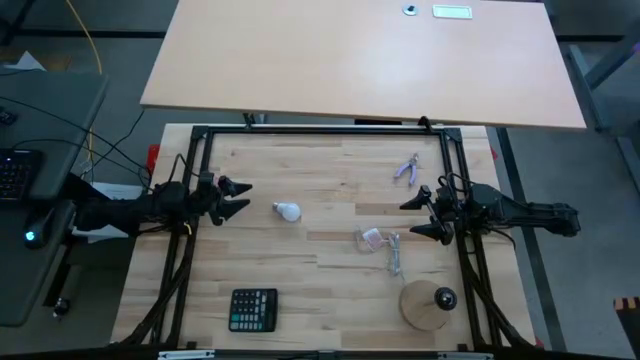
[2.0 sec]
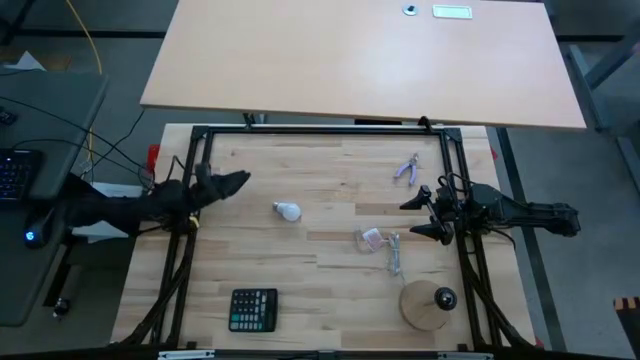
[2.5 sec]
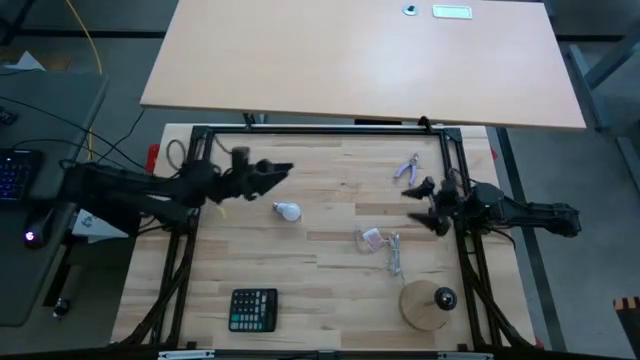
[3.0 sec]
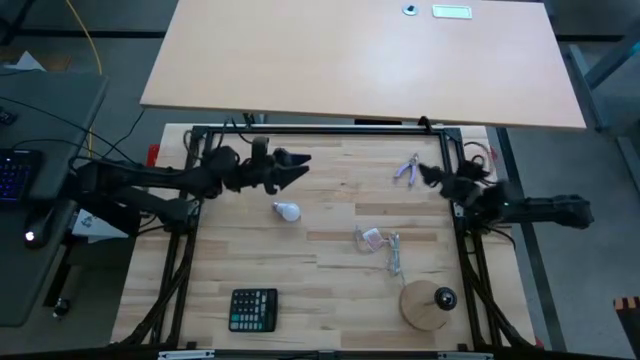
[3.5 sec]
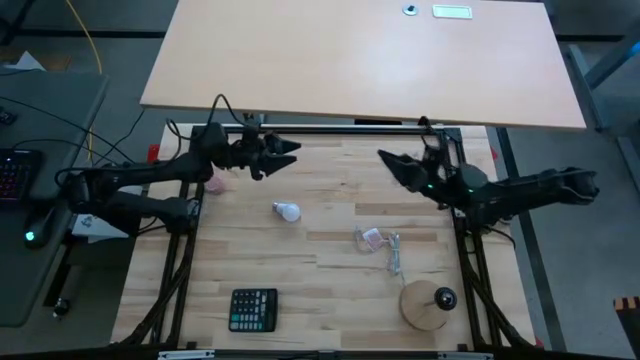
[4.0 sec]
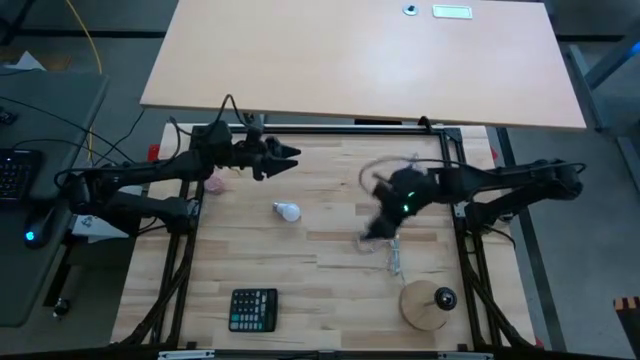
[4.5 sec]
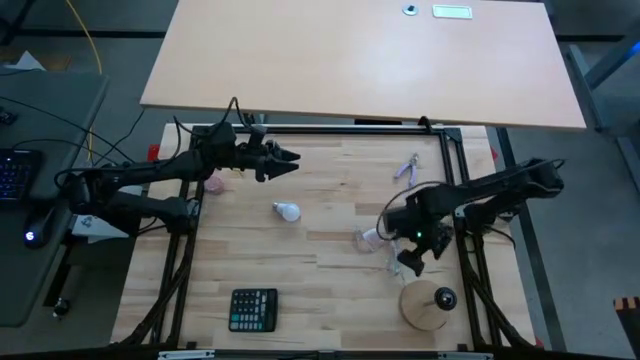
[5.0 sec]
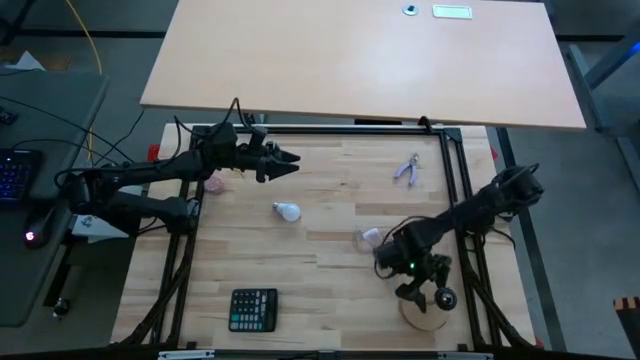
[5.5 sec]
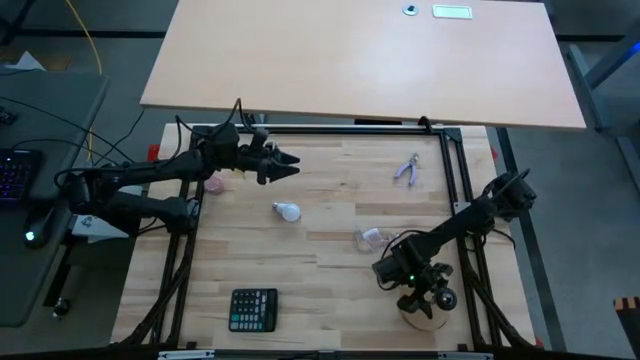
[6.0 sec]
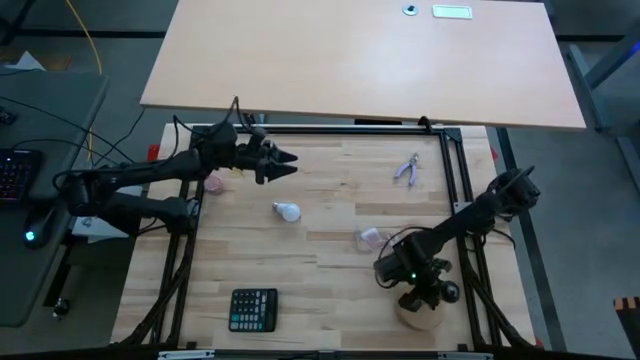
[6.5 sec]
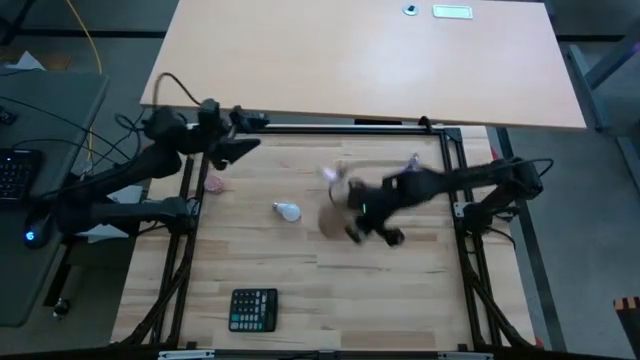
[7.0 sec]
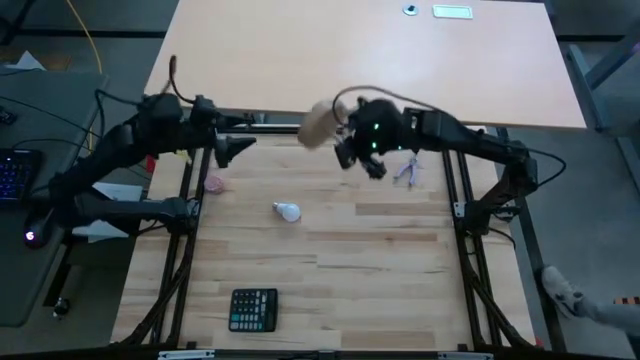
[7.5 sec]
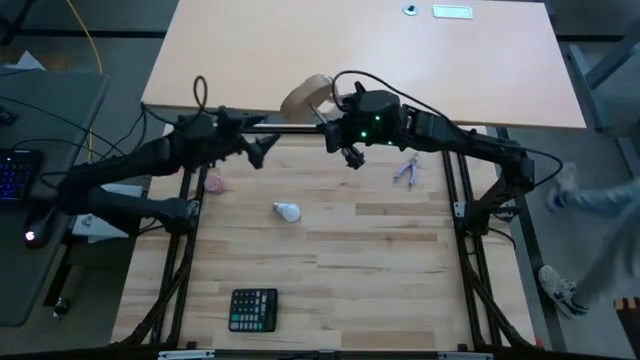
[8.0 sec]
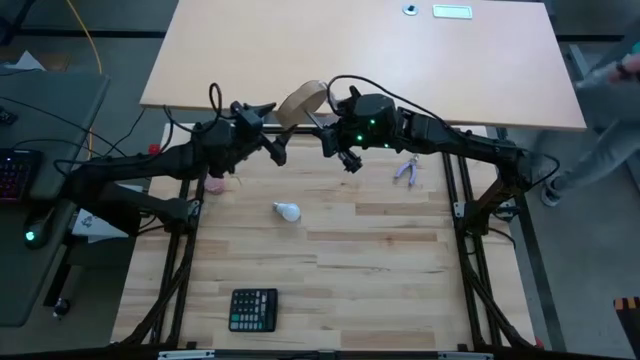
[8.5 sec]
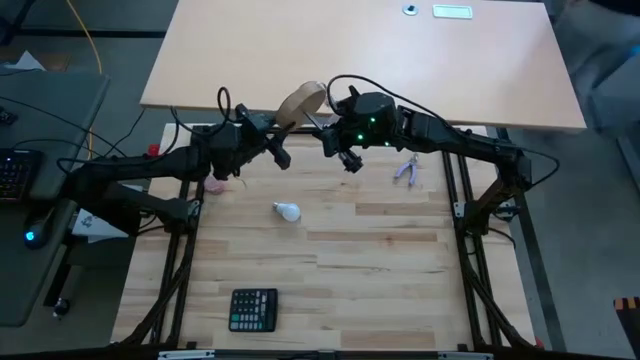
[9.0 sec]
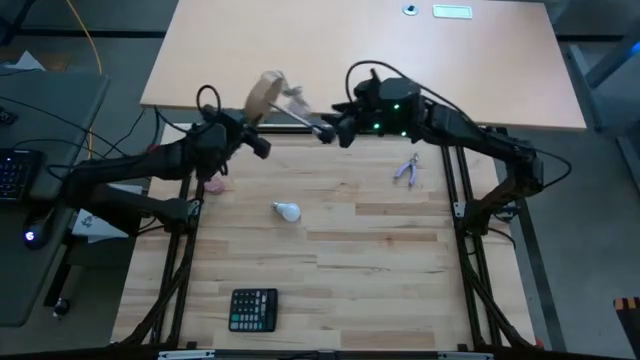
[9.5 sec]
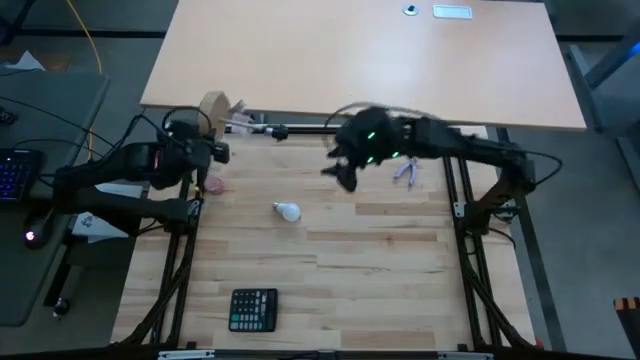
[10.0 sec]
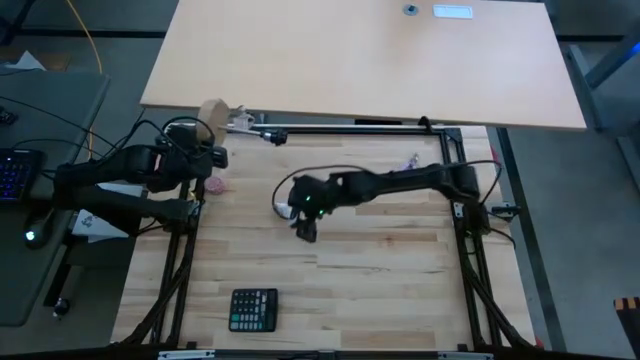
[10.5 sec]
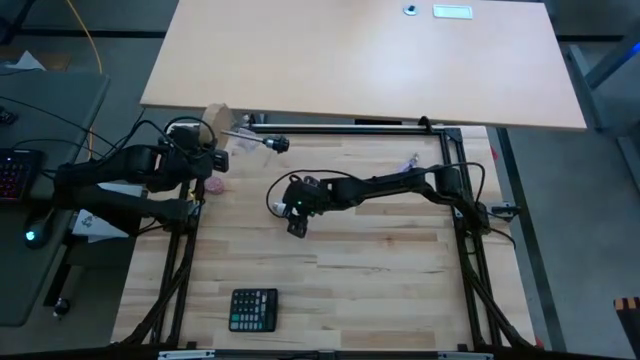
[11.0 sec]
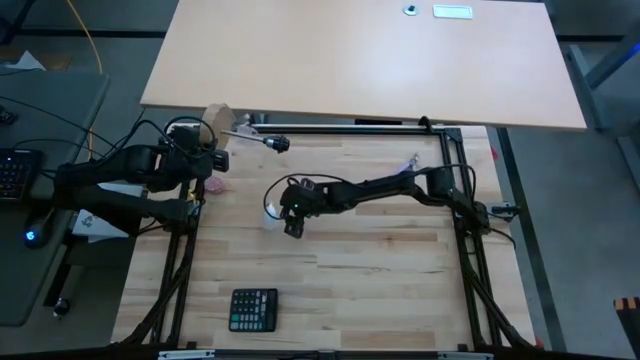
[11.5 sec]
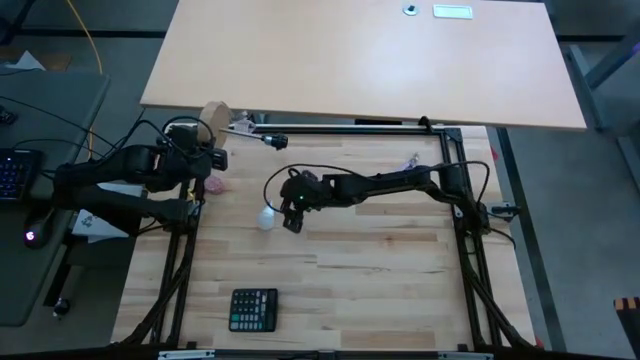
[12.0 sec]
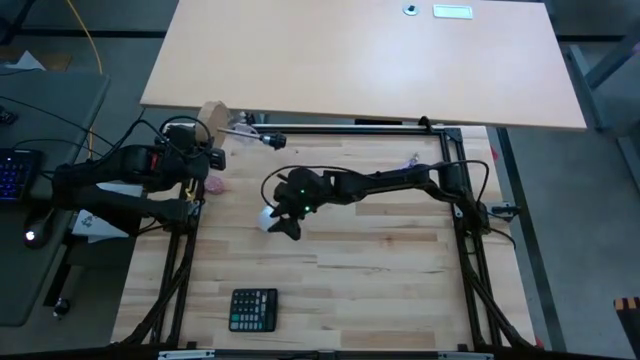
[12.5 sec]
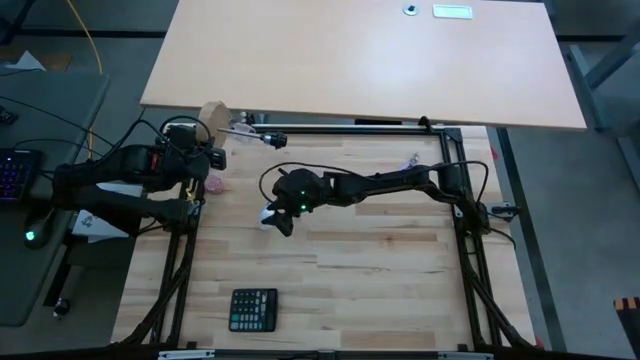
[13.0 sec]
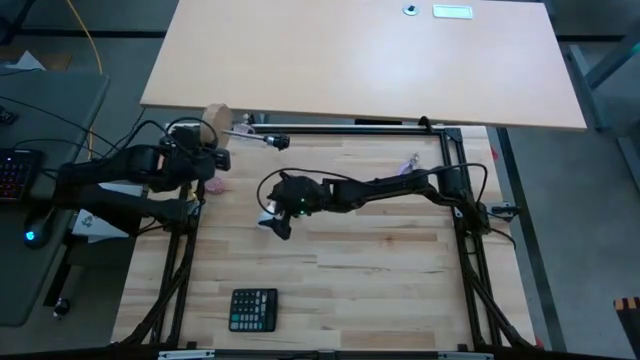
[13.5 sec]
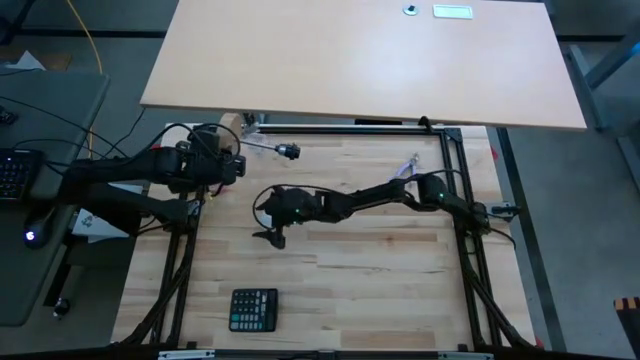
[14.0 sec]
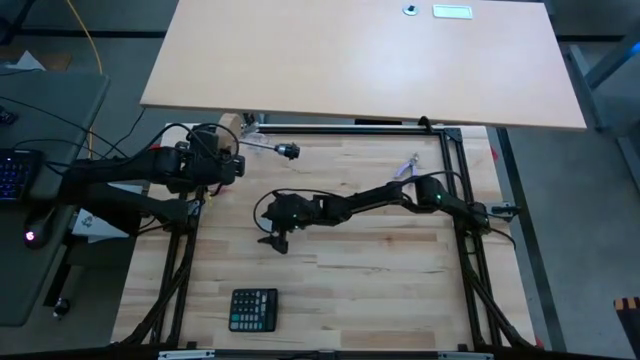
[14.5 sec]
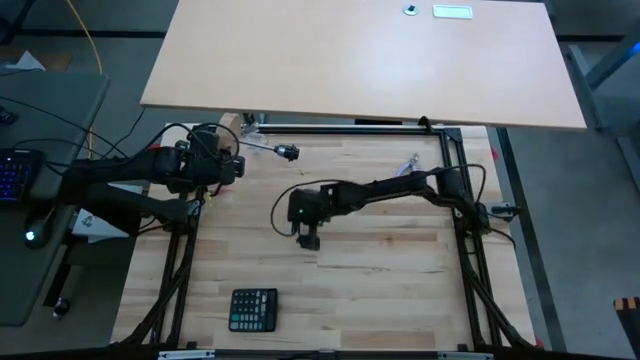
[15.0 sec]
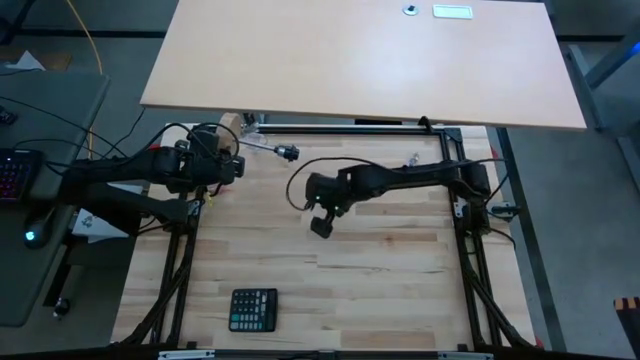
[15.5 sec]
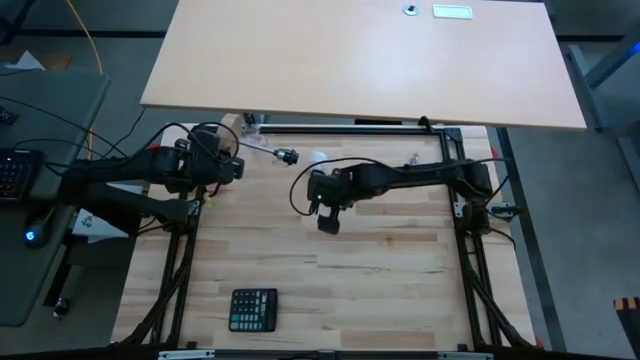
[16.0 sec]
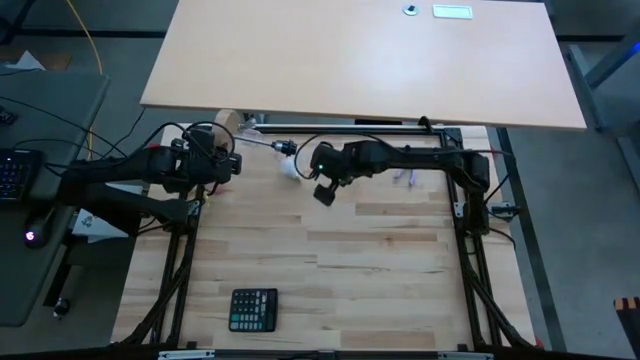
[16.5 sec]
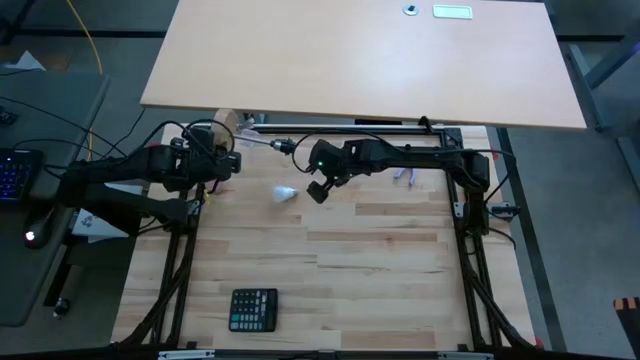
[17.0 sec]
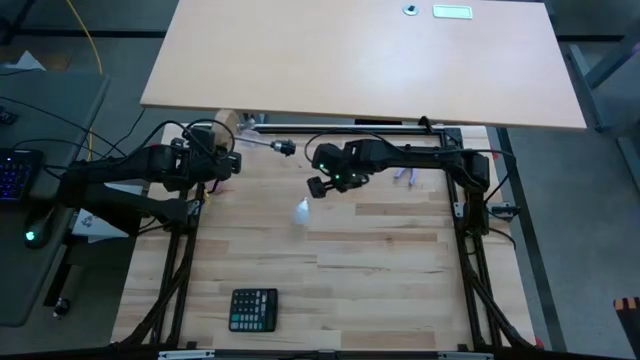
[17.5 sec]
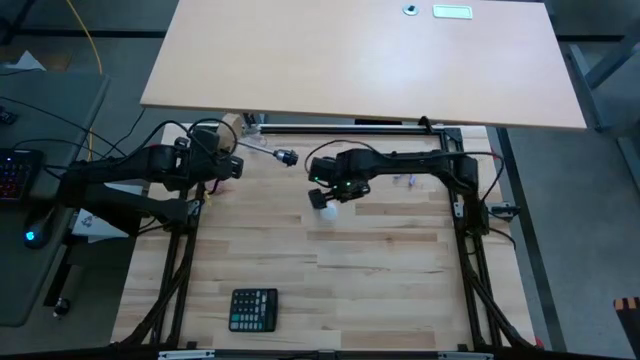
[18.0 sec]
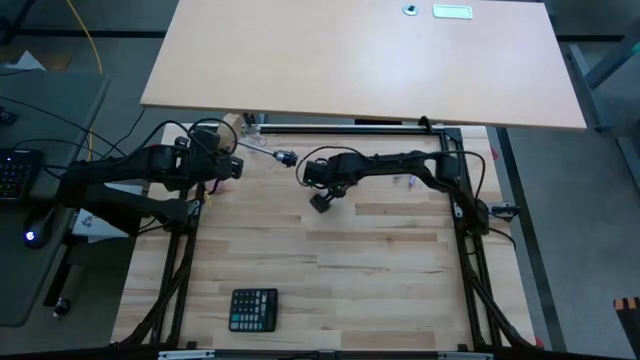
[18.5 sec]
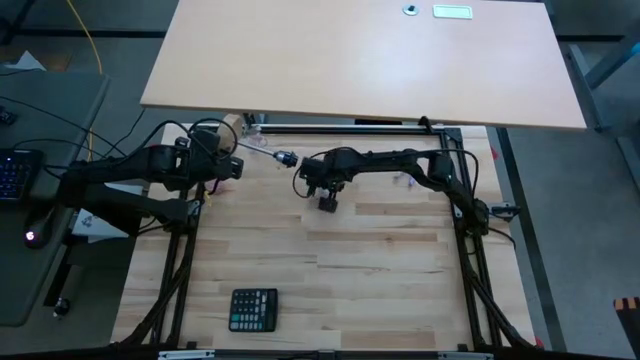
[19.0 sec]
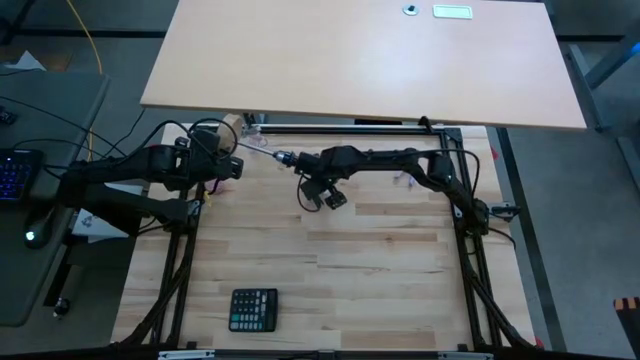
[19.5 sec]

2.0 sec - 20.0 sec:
Task: Screw lightbulb
Insert the white lightbulb into the brown lamp
